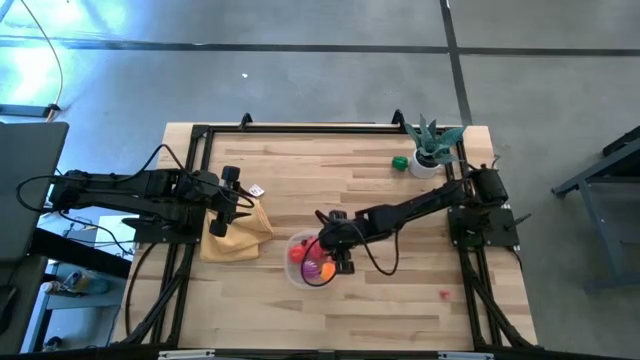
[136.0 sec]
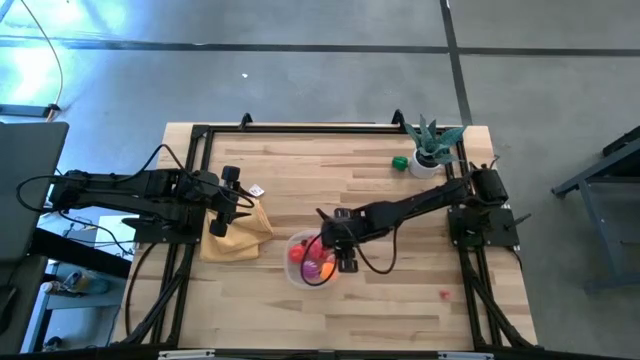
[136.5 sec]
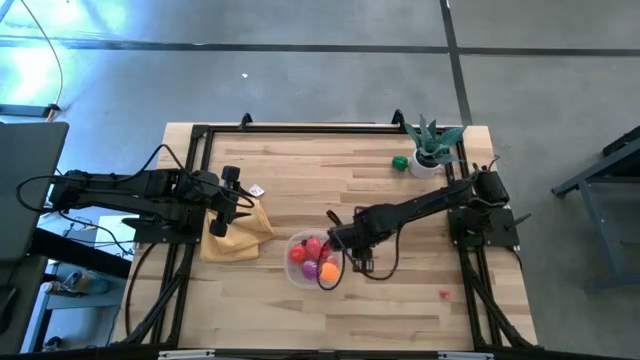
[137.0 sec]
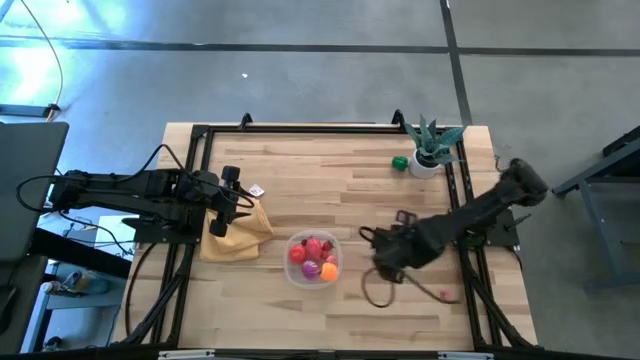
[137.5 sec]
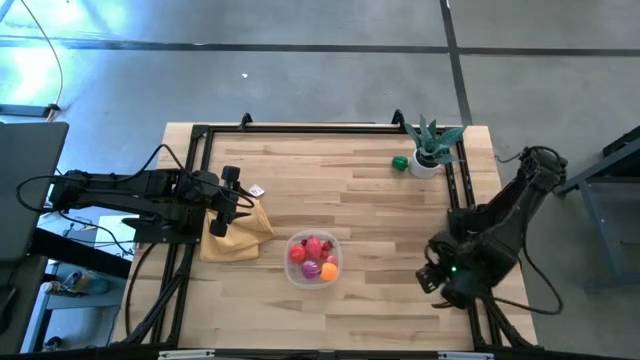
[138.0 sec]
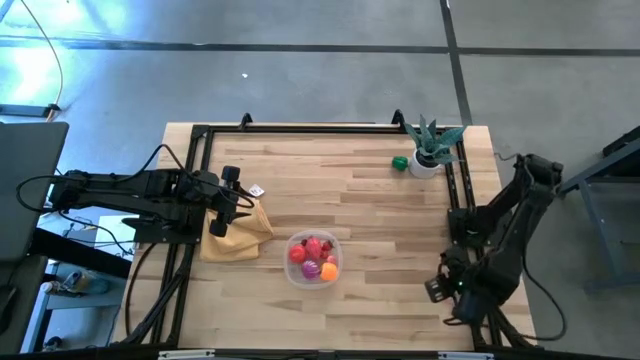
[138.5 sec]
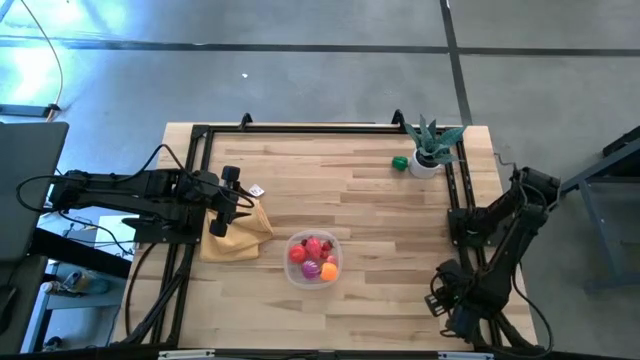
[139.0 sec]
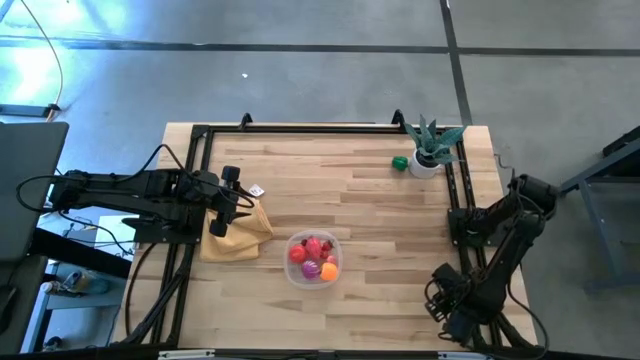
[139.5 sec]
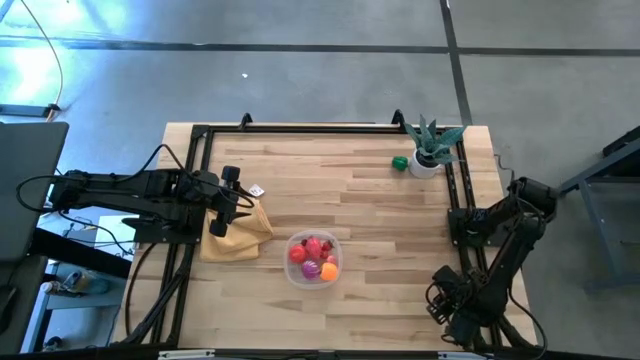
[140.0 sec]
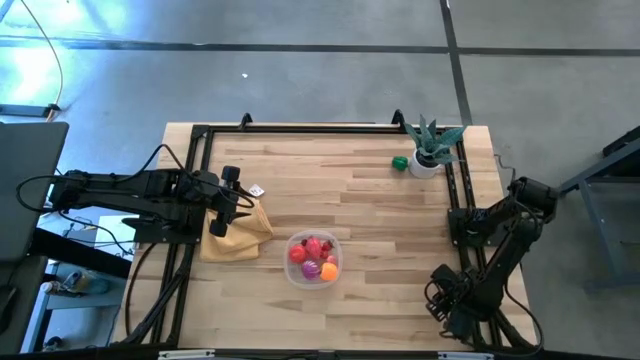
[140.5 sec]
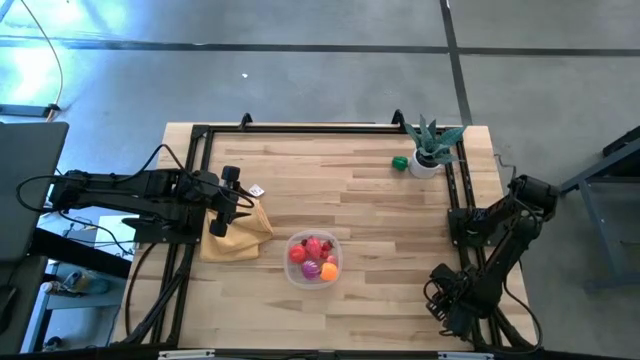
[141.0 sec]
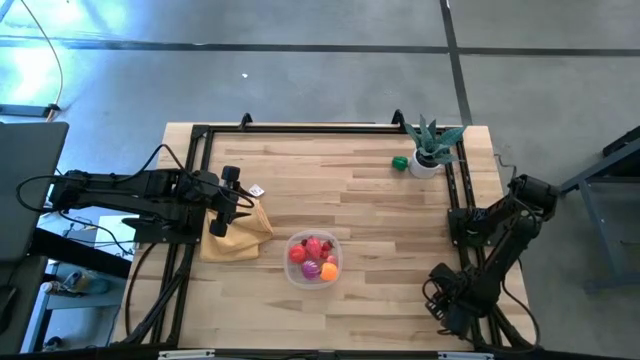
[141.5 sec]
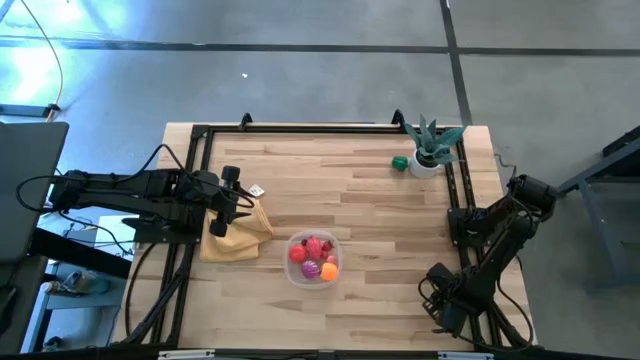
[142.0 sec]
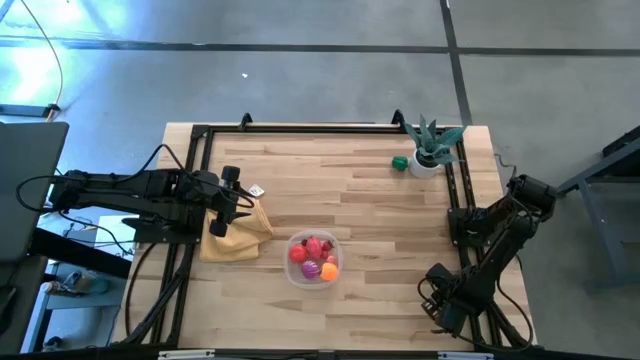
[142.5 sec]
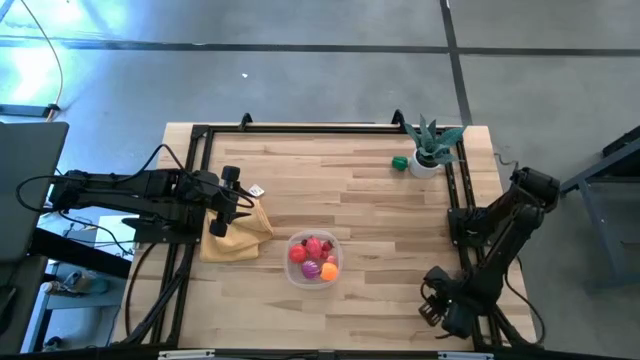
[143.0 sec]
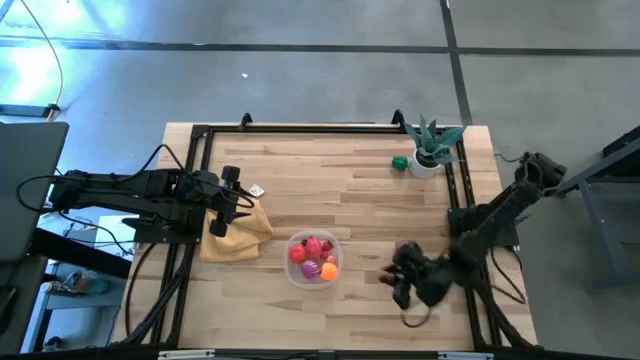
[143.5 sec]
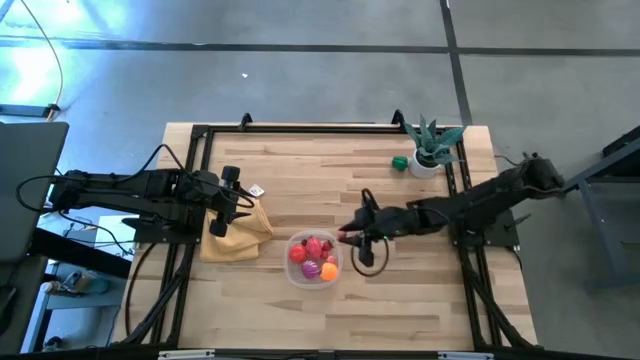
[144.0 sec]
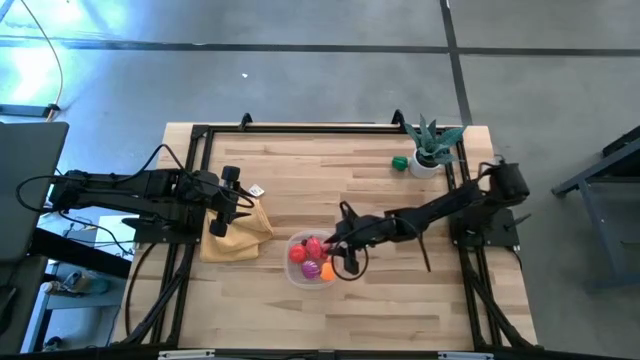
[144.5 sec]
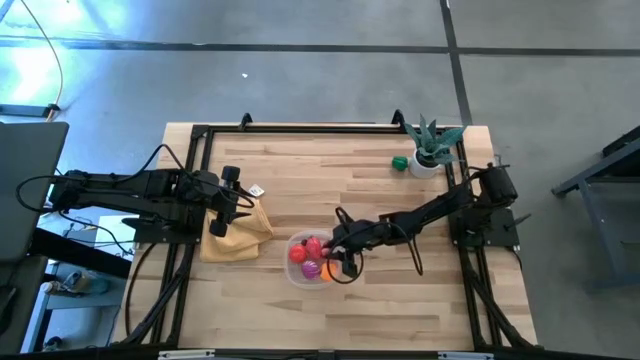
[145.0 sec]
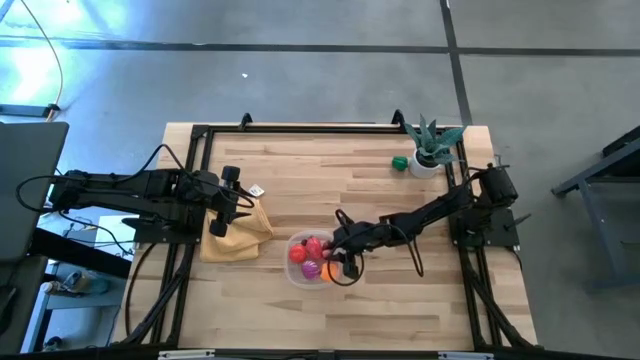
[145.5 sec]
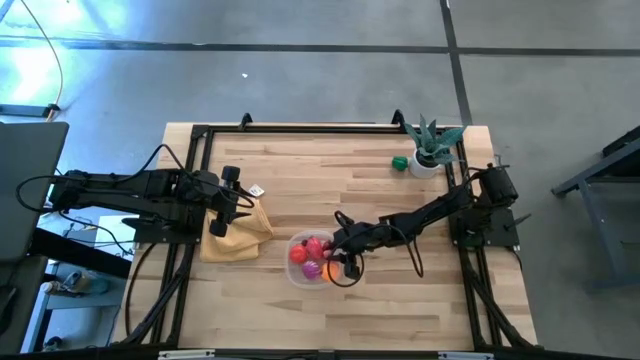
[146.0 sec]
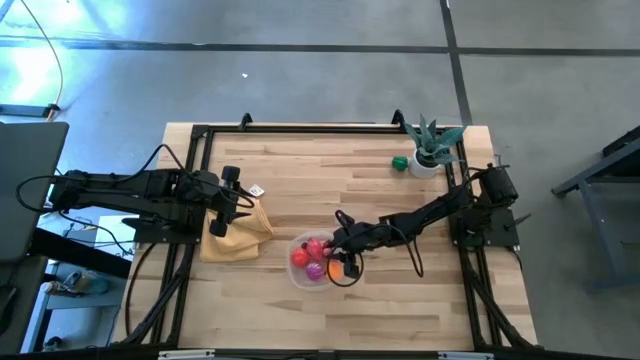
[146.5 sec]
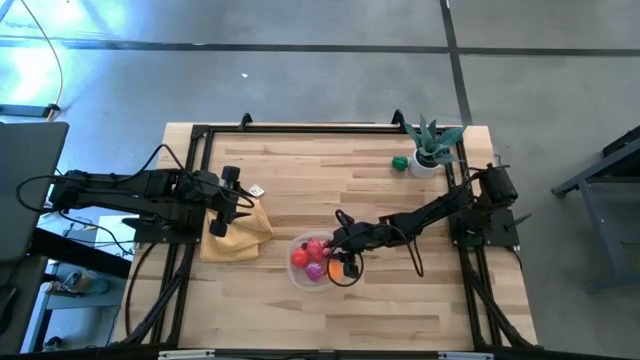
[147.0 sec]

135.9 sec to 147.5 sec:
Task: Pick and placing Produce into tupperware
Put the pink peach into the transparent bin

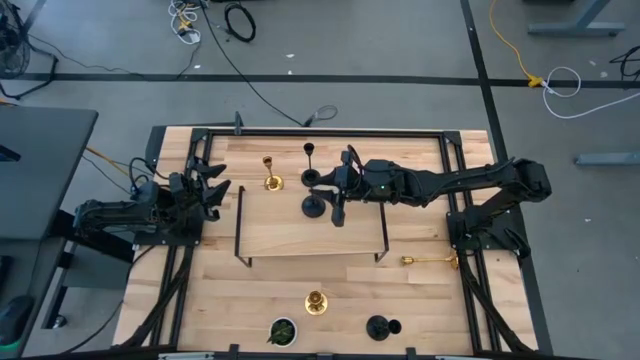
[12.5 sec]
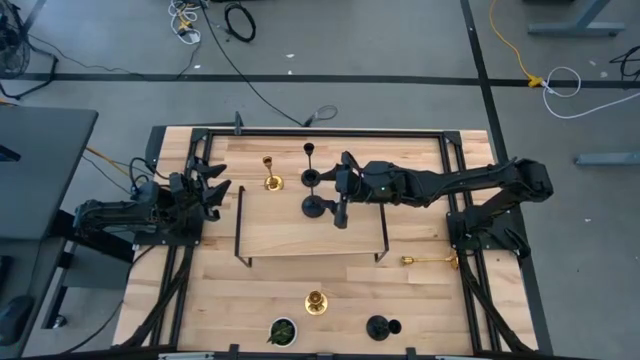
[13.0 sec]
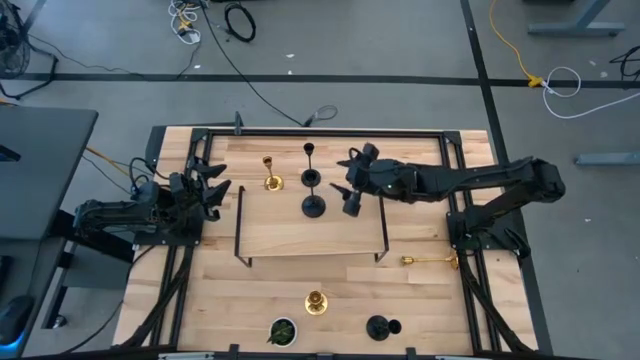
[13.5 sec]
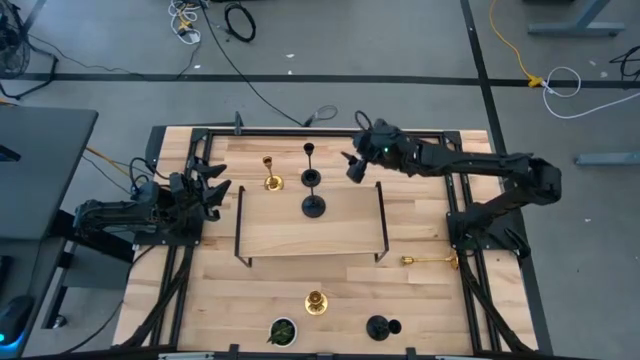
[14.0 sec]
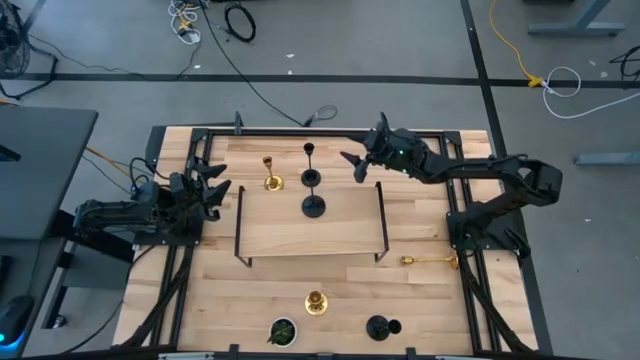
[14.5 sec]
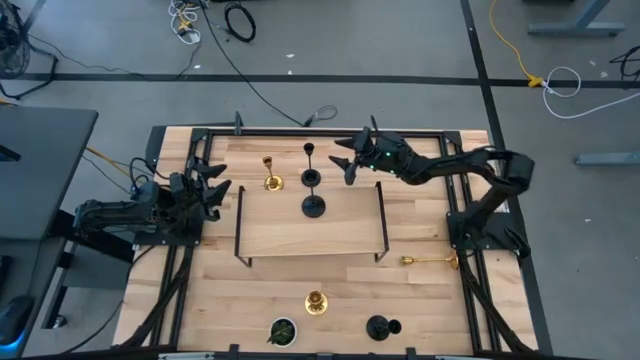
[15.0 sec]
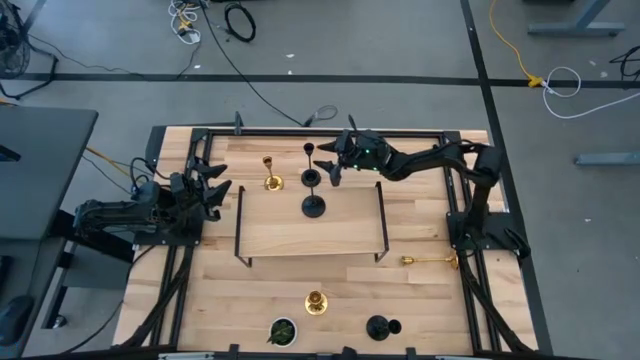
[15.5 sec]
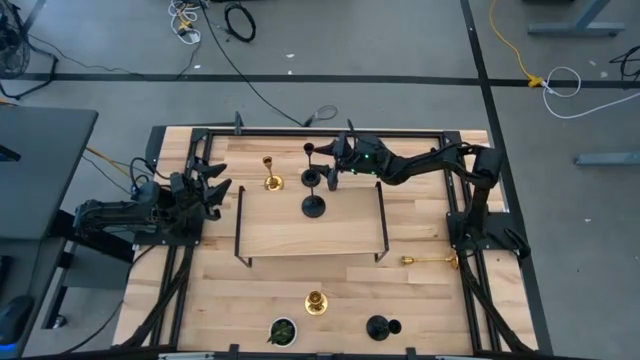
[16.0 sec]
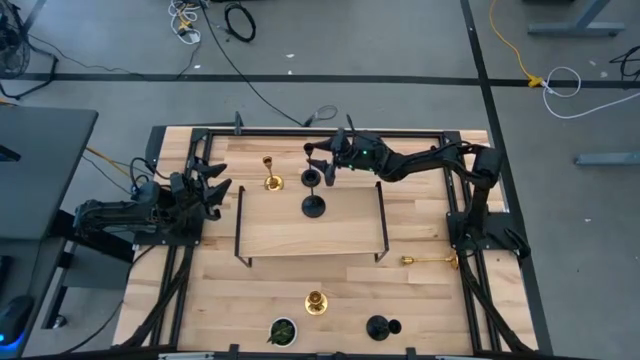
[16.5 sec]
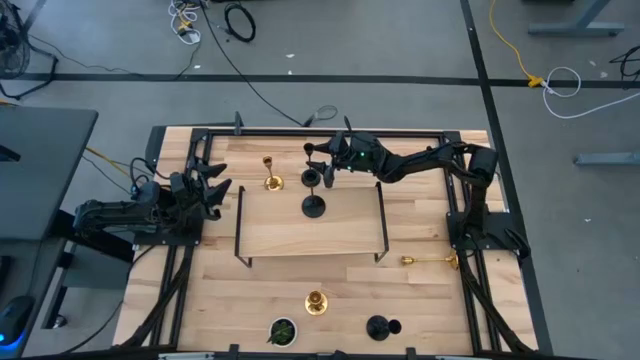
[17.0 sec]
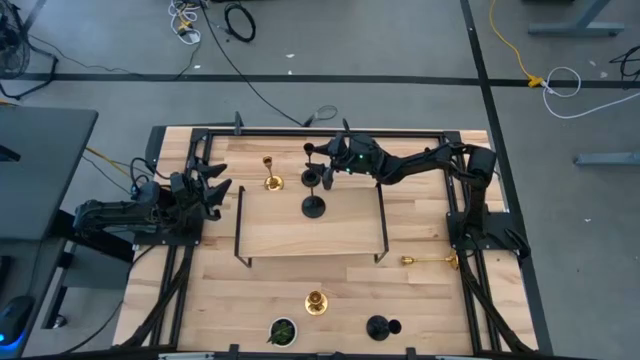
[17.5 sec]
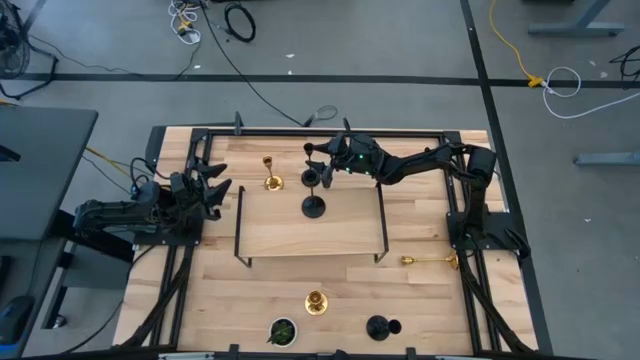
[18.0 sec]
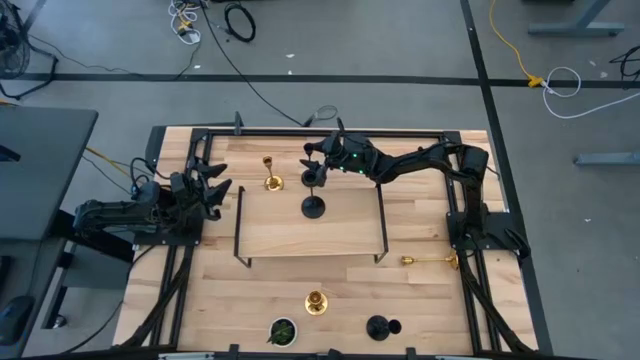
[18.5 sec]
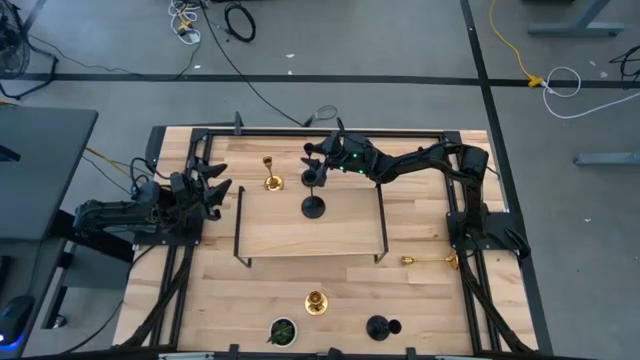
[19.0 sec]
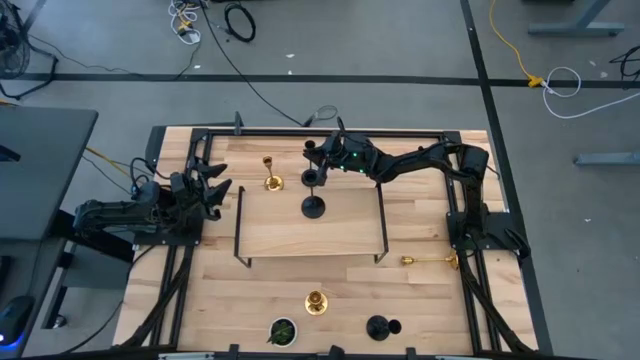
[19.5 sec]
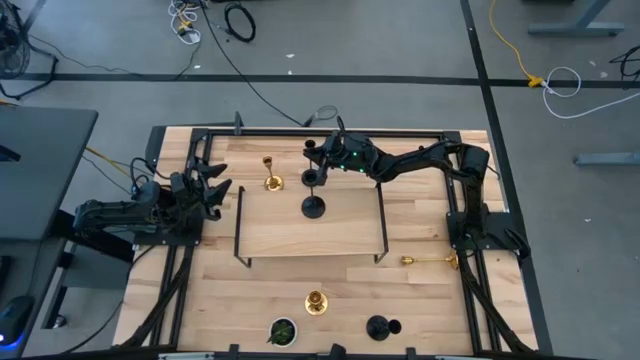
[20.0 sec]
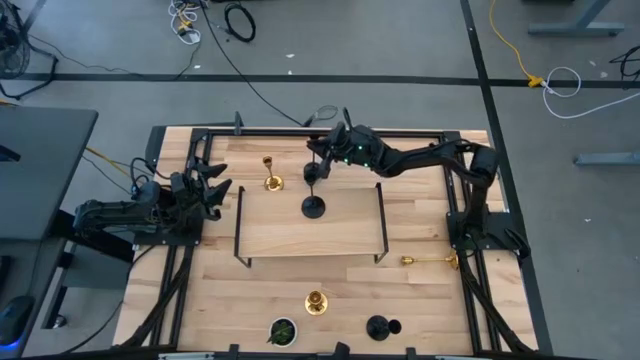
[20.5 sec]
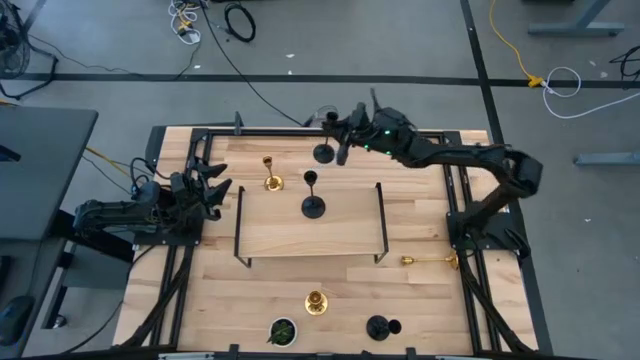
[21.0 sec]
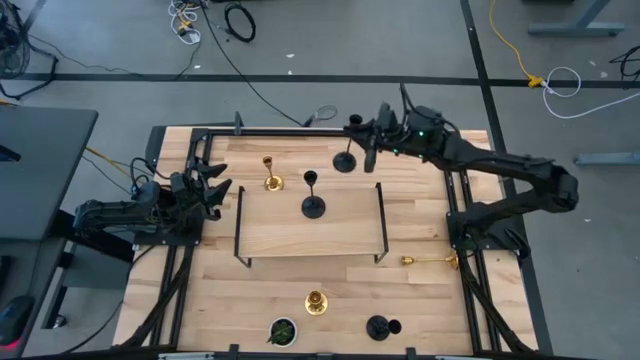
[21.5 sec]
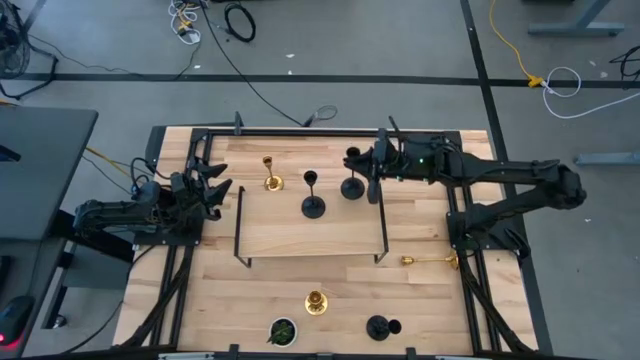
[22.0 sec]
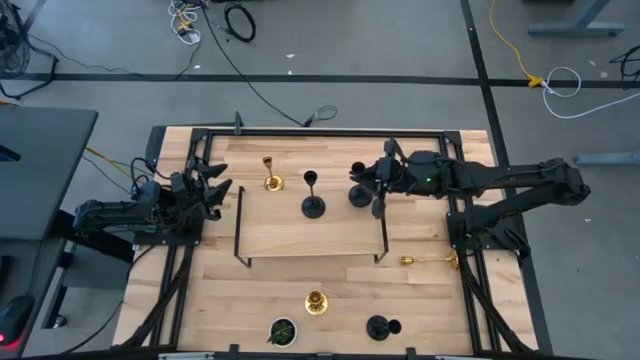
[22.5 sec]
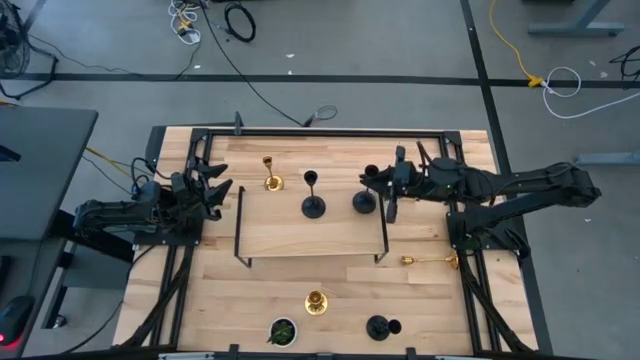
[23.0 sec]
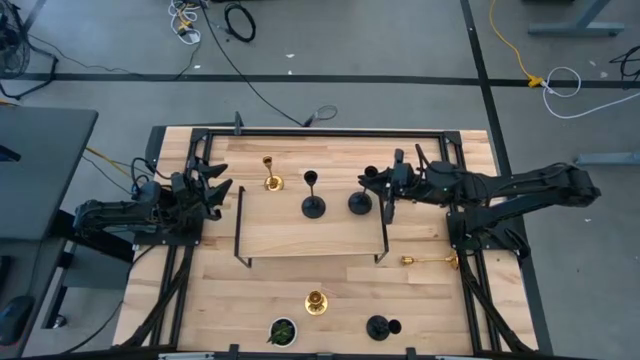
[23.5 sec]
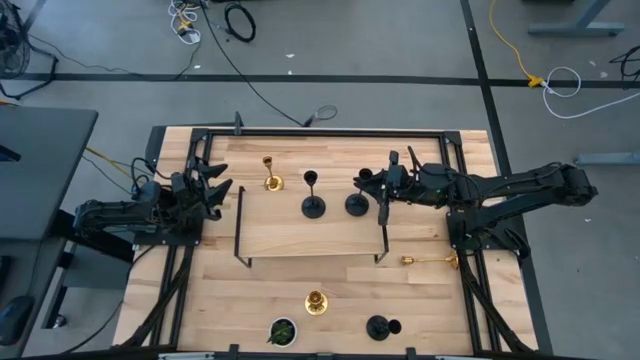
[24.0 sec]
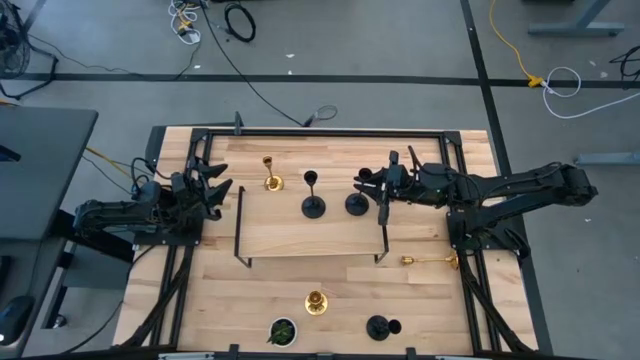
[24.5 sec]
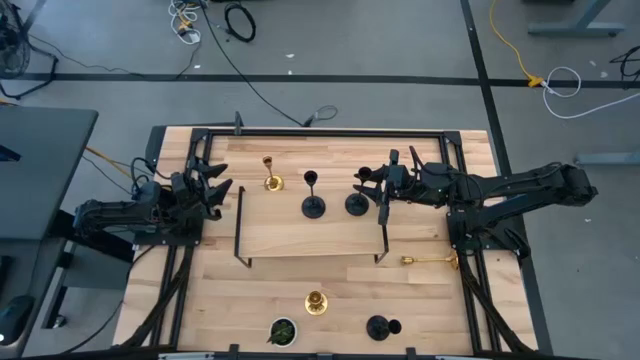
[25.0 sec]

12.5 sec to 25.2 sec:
Task: Pick & Place candle stick holders
Put the top black candle holder aligned with the other black candle holder on the shelf
